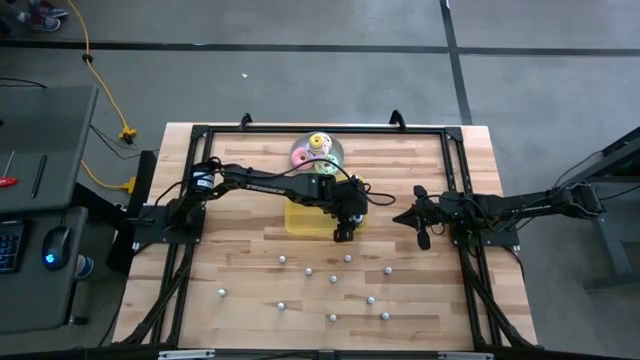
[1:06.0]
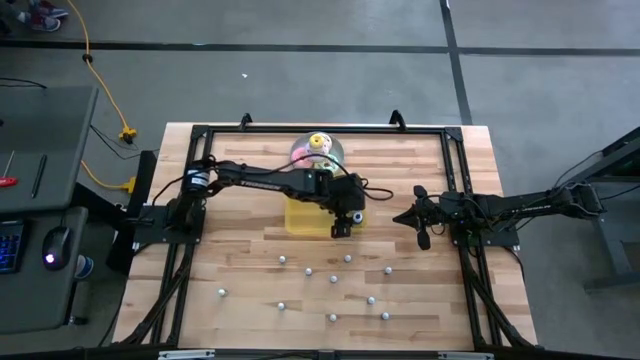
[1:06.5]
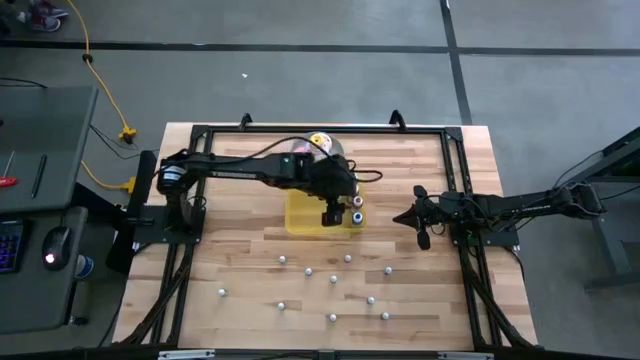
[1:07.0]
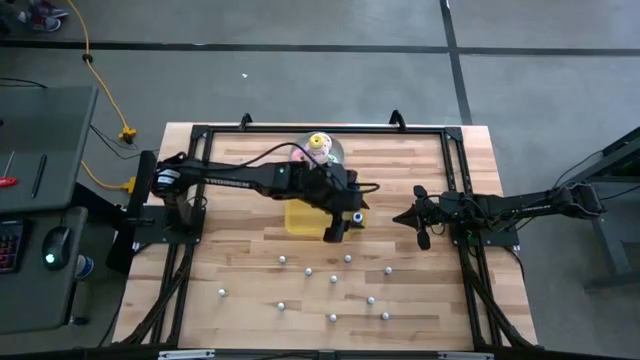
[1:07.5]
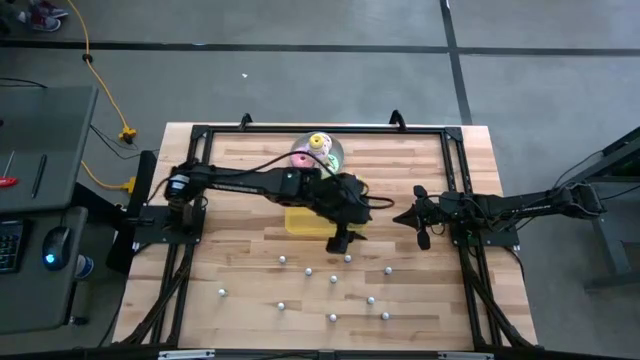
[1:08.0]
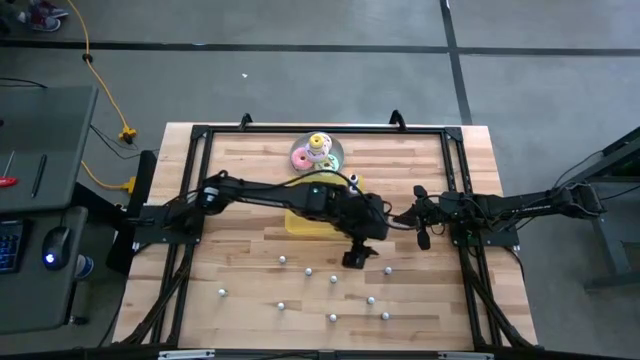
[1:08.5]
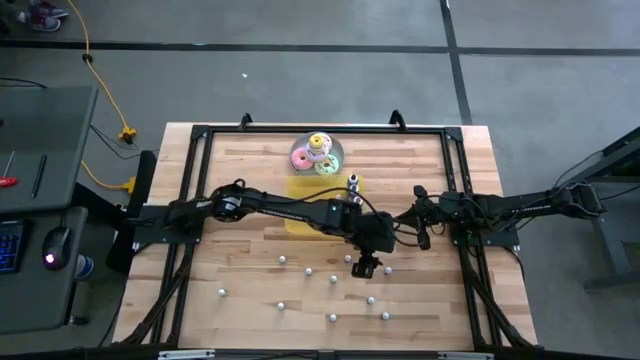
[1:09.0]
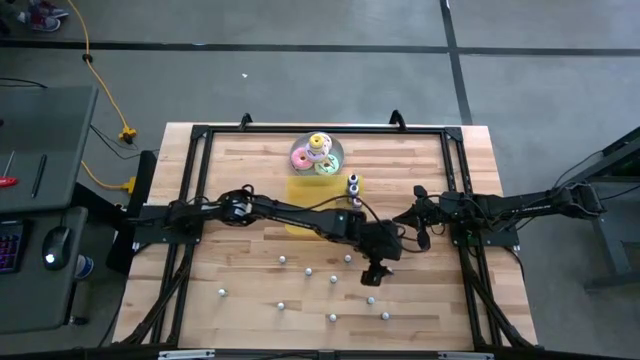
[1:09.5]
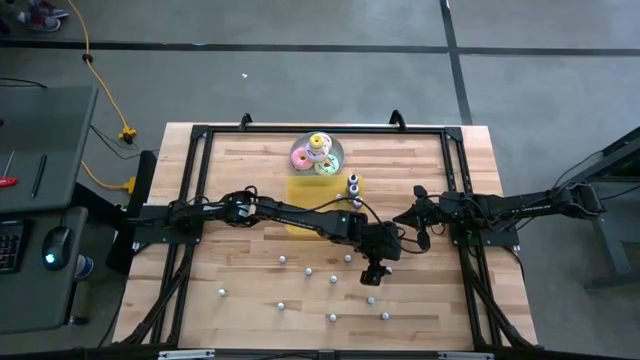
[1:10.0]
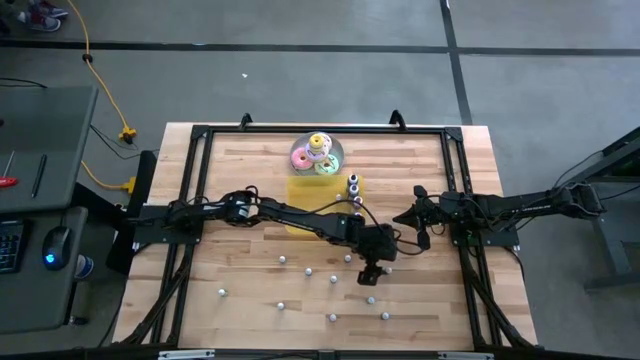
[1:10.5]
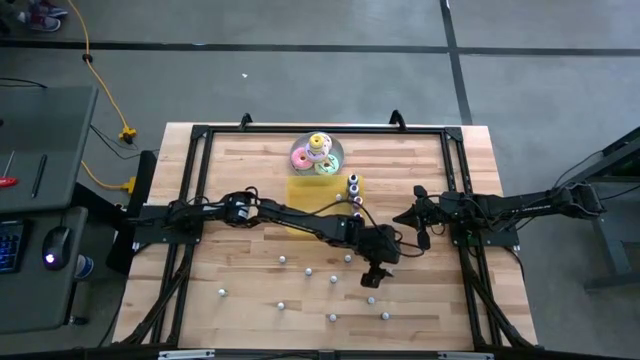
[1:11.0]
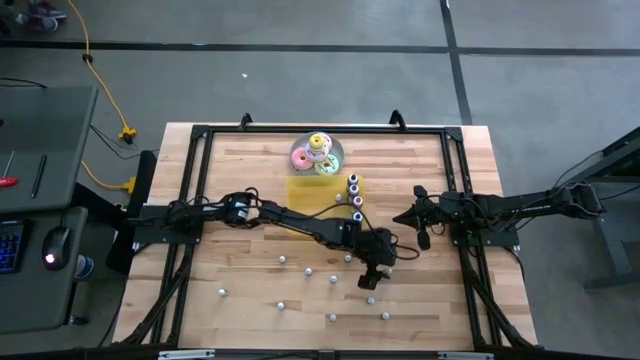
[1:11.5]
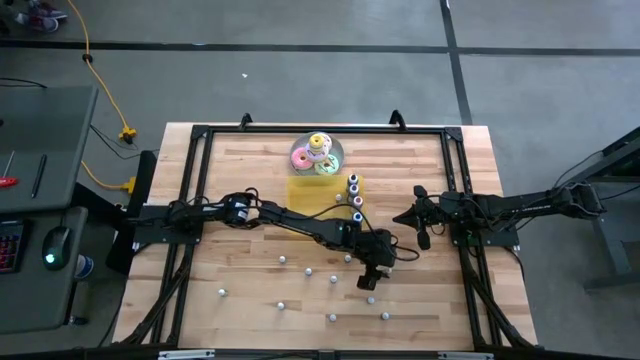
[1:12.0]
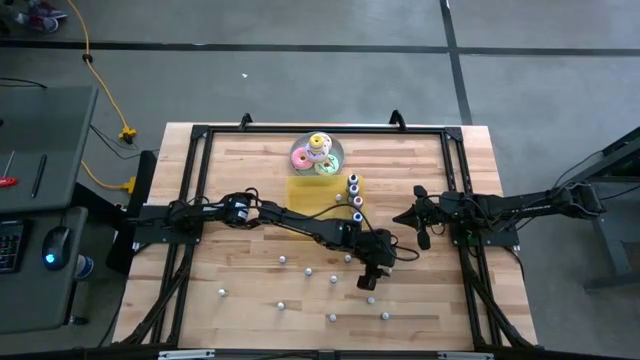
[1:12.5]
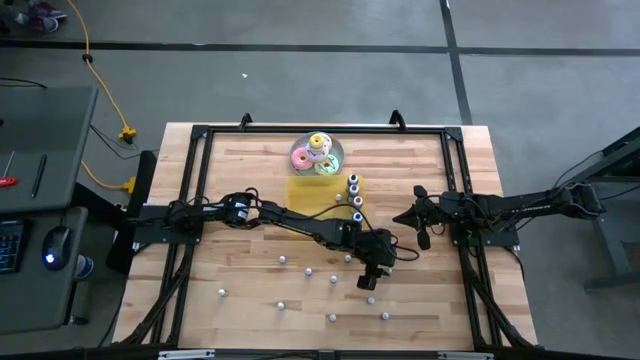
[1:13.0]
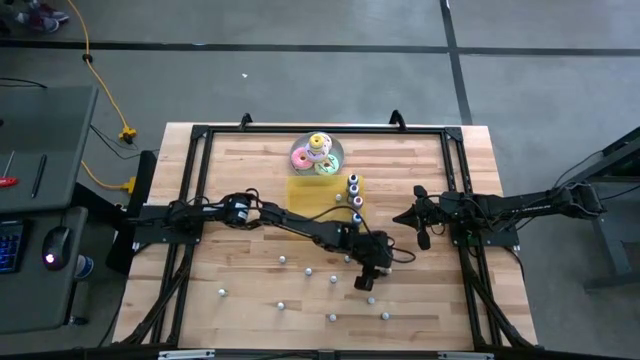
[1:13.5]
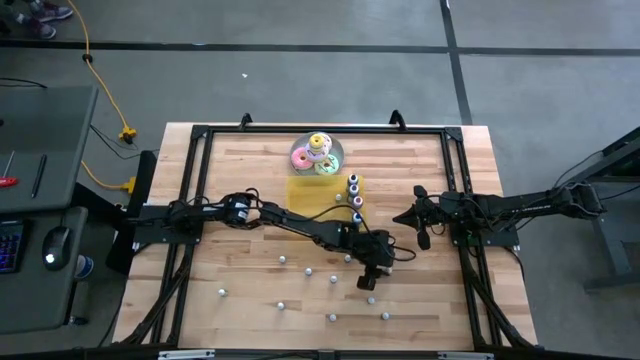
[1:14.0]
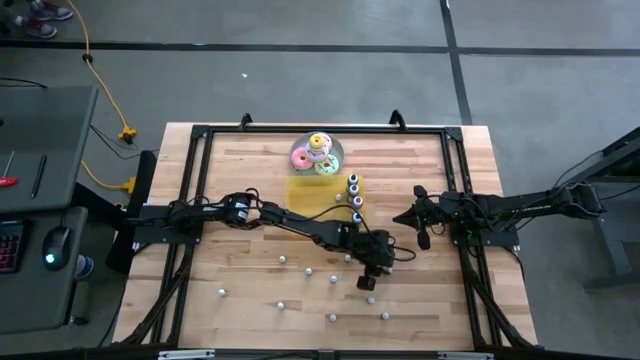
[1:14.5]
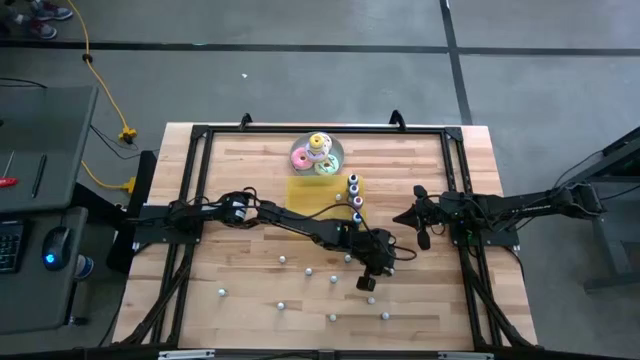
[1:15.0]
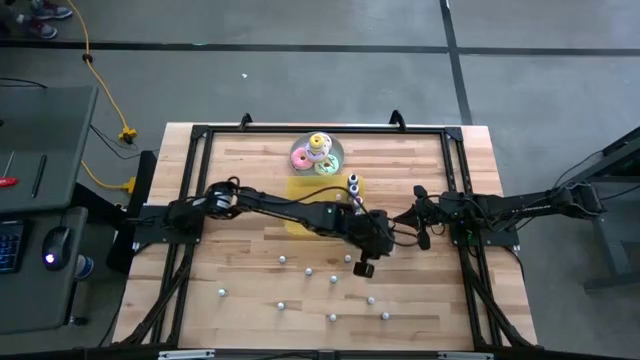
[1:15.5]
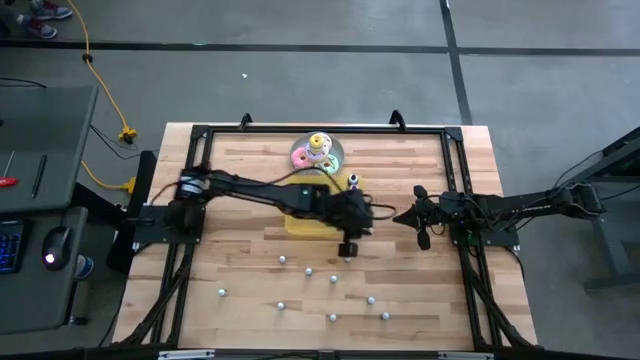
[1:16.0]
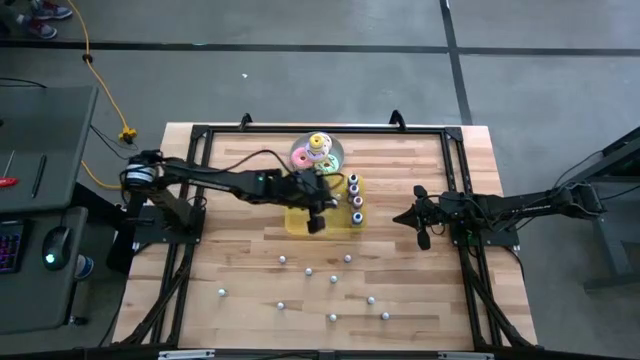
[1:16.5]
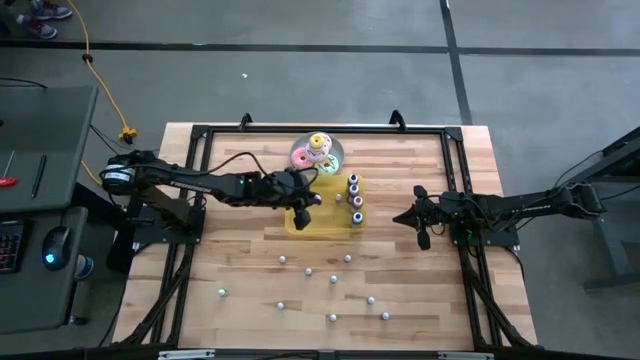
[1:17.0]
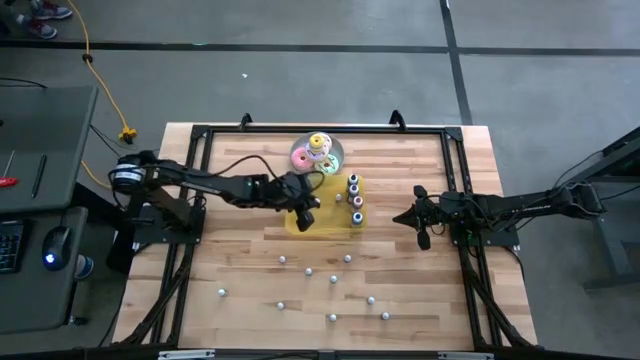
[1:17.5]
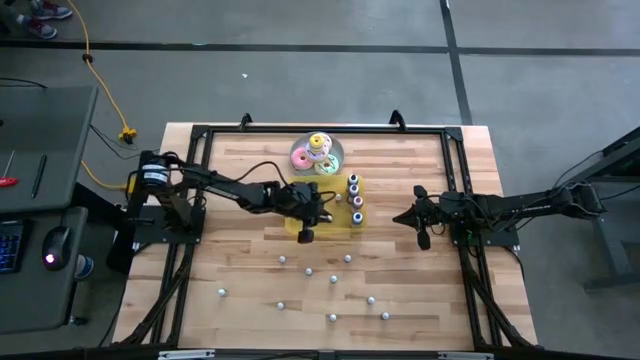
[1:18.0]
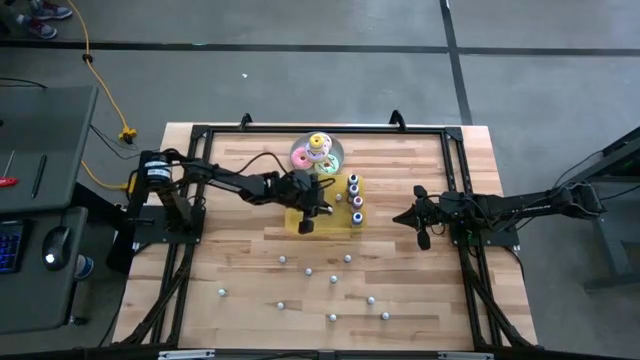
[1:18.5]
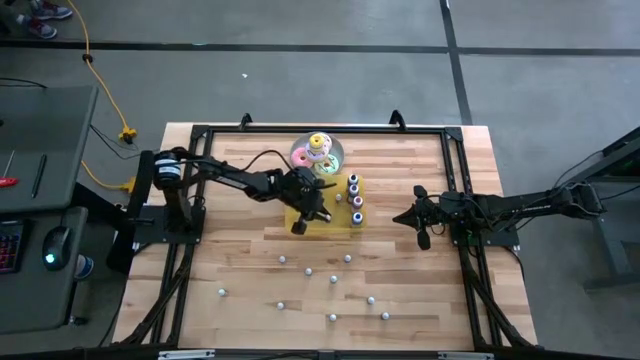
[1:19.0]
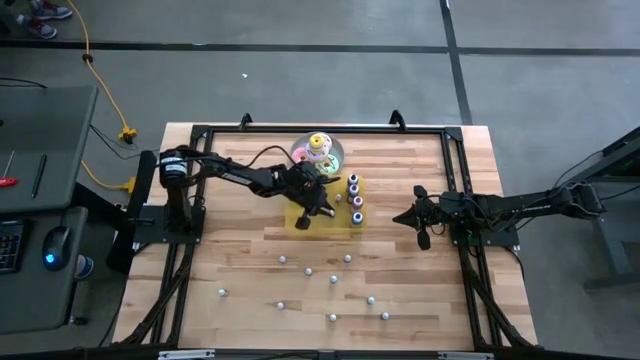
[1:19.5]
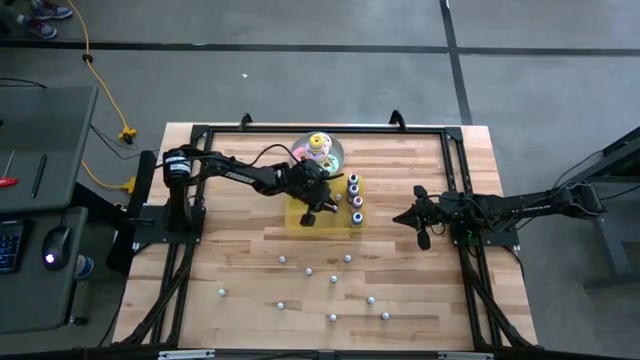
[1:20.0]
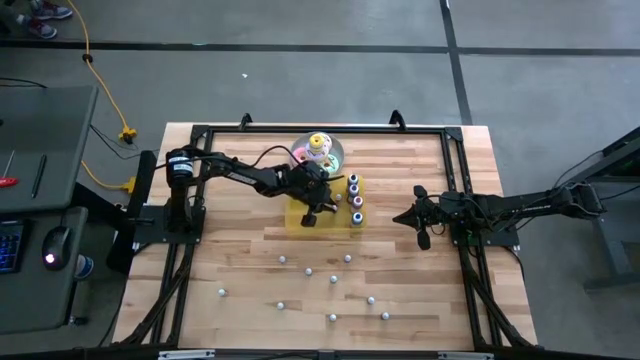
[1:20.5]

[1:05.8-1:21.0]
Task: Pick & Place food coloring
Put the small brown food coloring bottle into the yellow container

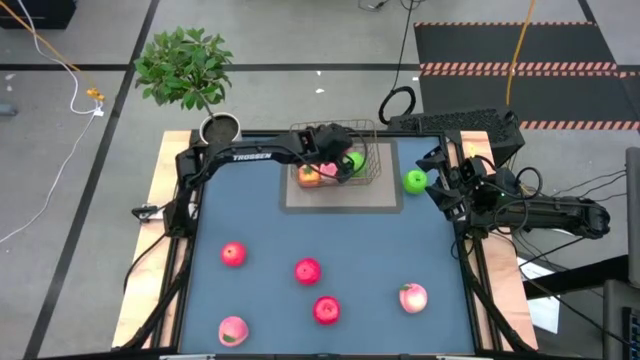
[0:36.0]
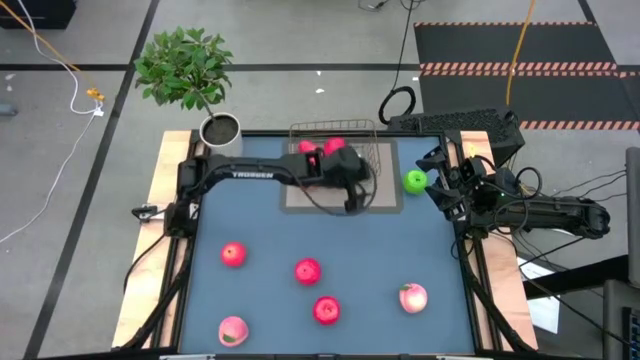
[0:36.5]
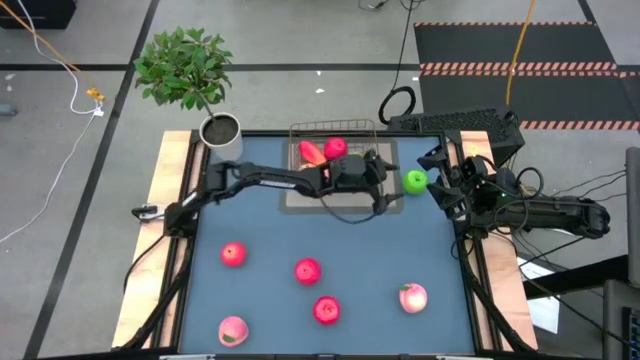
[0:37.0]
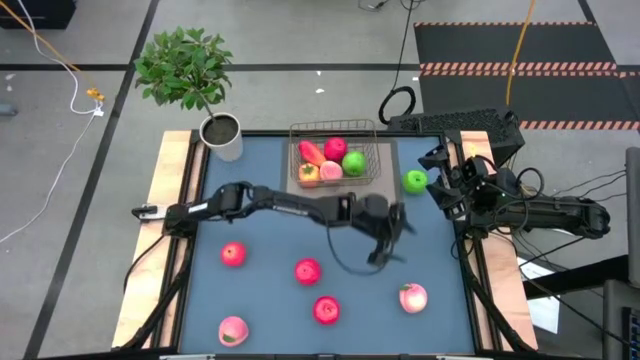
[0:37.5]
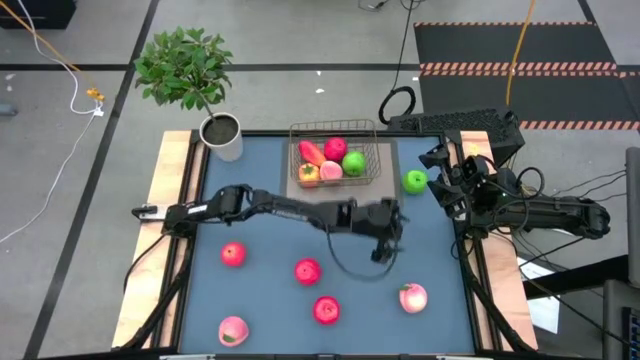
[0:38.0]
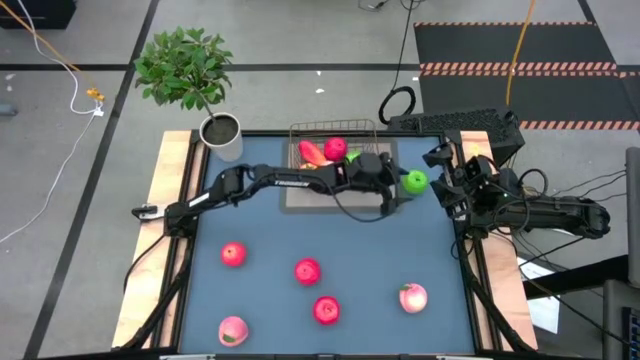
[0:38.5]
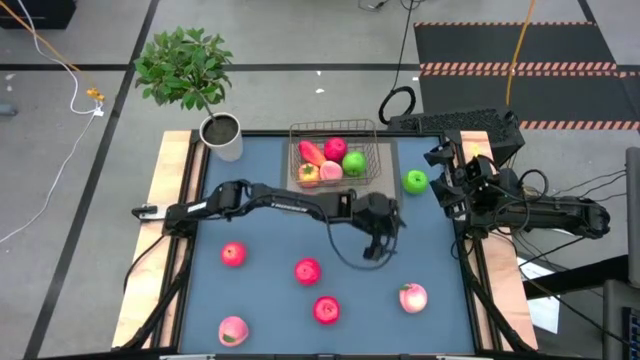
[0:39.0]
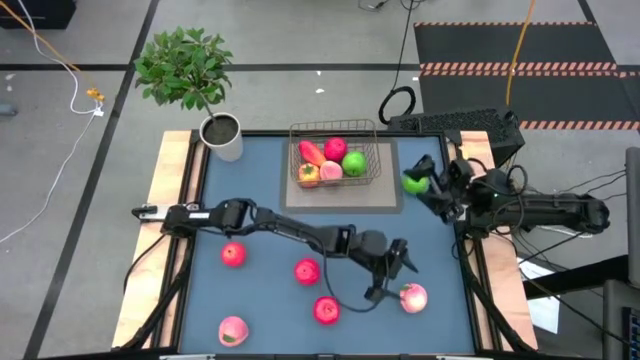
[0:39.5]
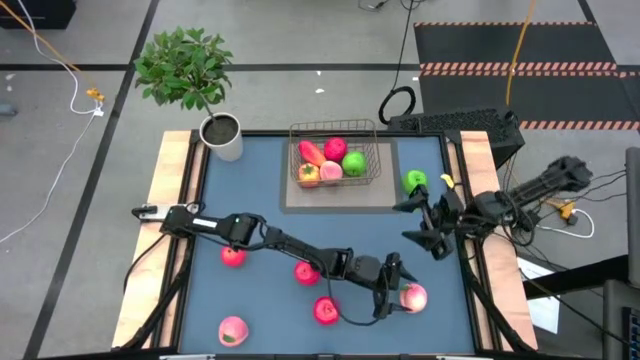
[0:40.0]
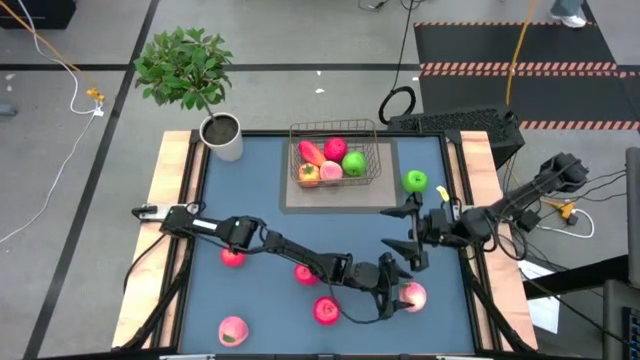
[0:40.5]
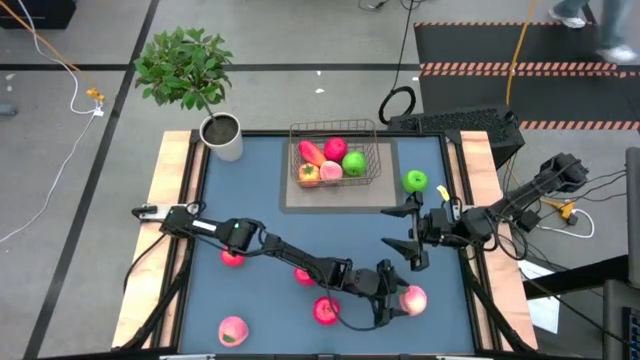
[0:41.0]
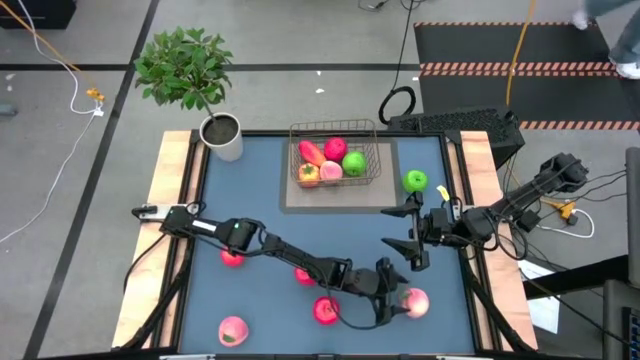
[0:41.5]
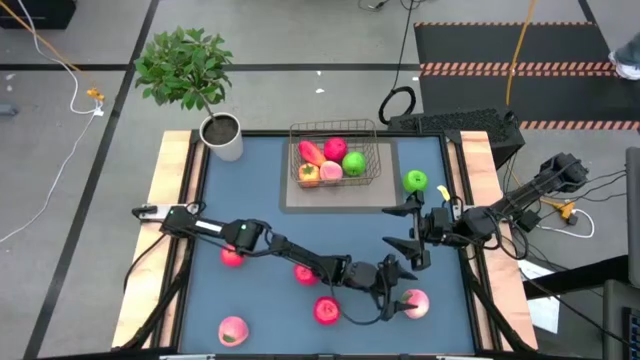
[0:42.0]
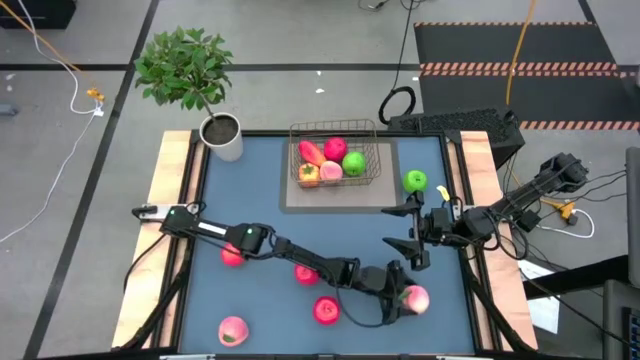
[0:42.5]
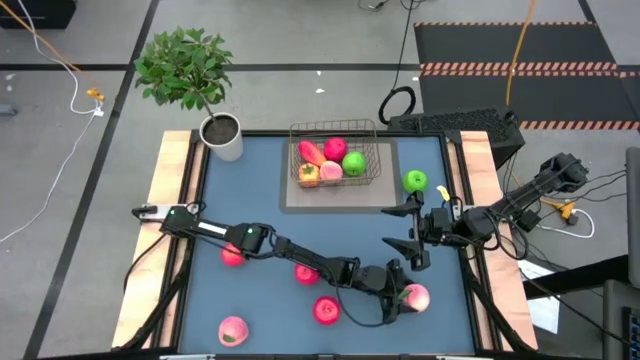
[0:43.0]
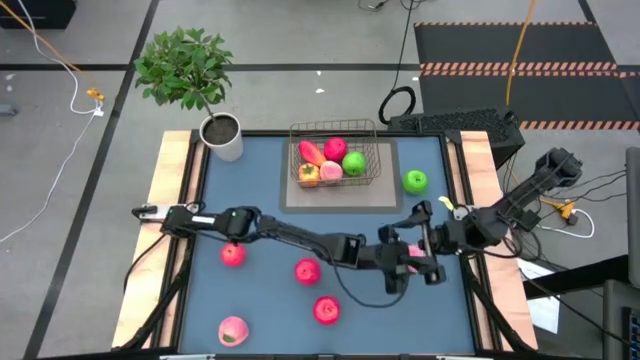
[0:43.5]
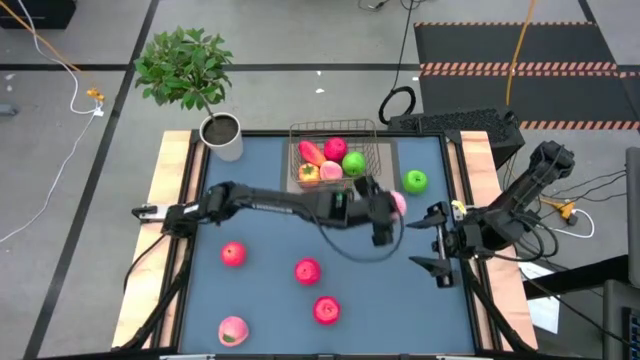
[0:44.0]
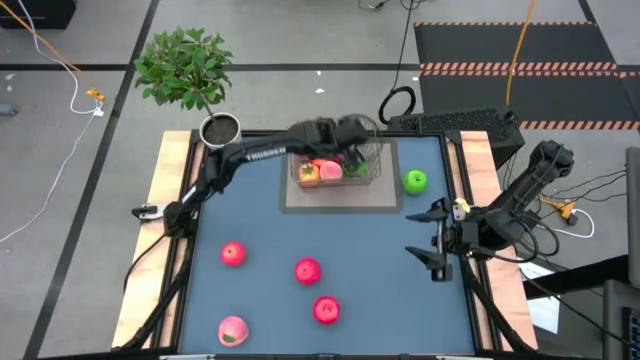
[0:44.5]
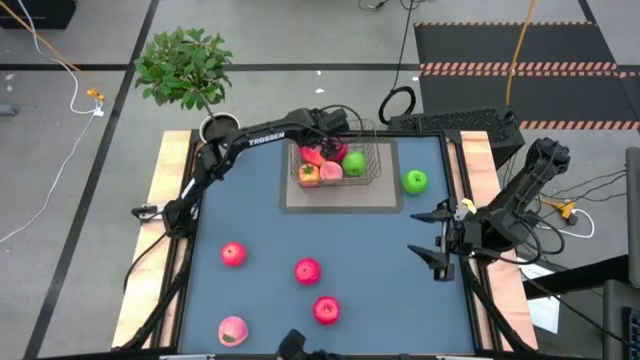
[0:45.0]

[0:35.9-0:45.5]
Task: Build produce basket
Put the pink peach into the wire basket
